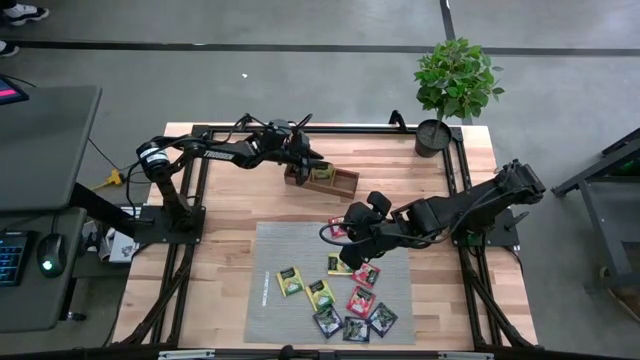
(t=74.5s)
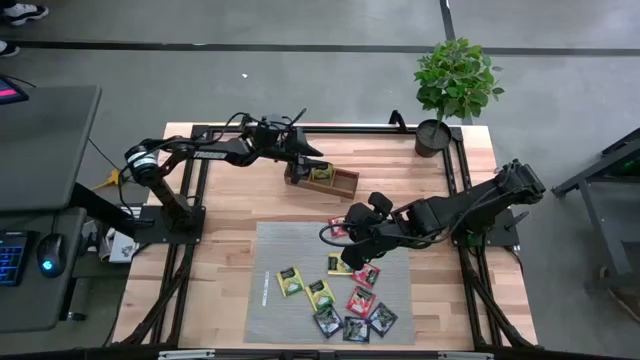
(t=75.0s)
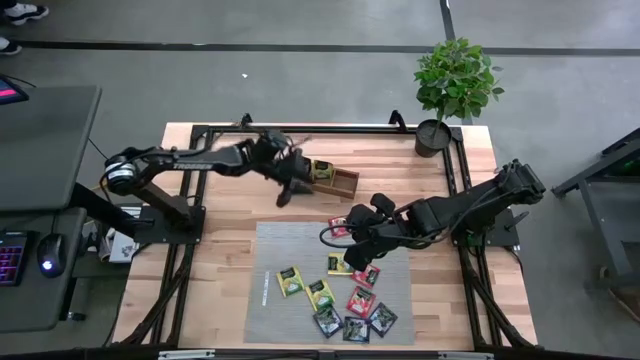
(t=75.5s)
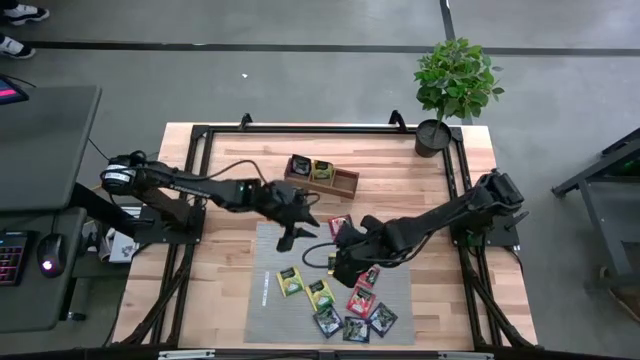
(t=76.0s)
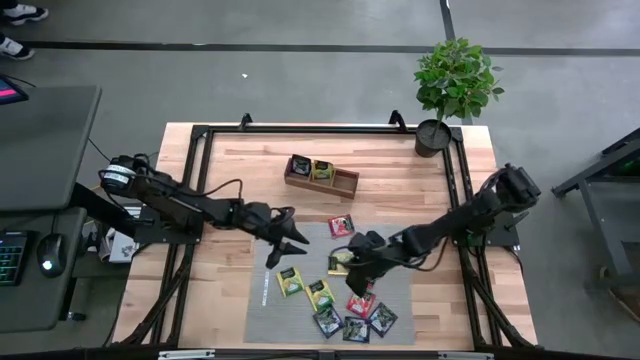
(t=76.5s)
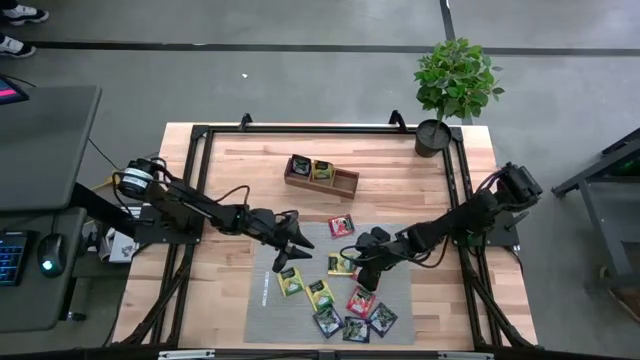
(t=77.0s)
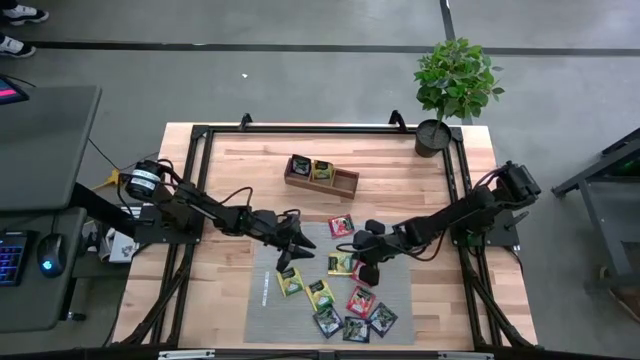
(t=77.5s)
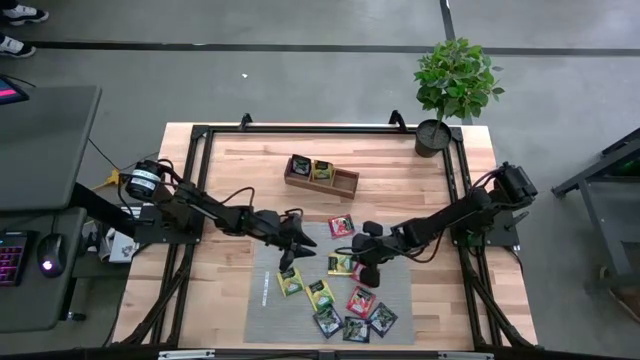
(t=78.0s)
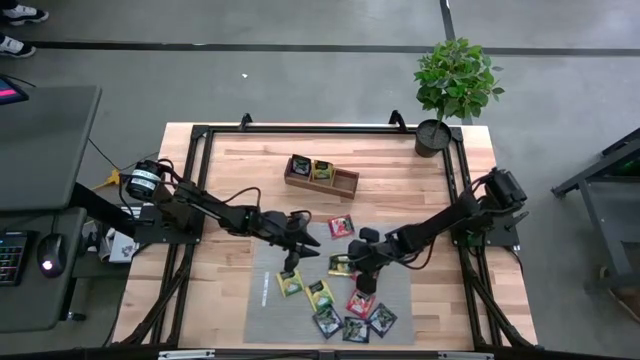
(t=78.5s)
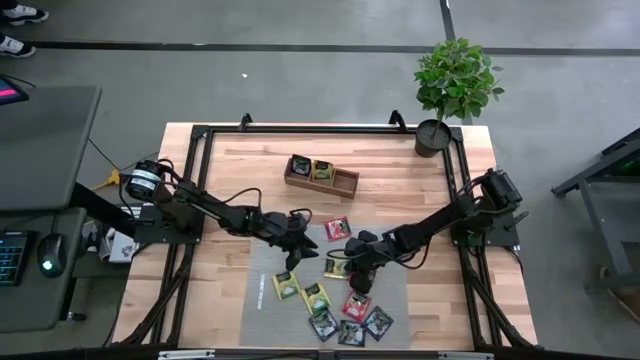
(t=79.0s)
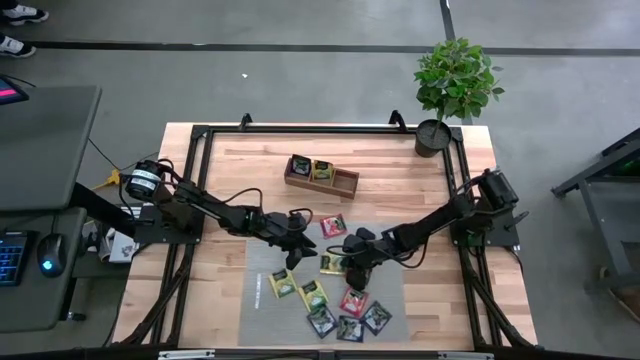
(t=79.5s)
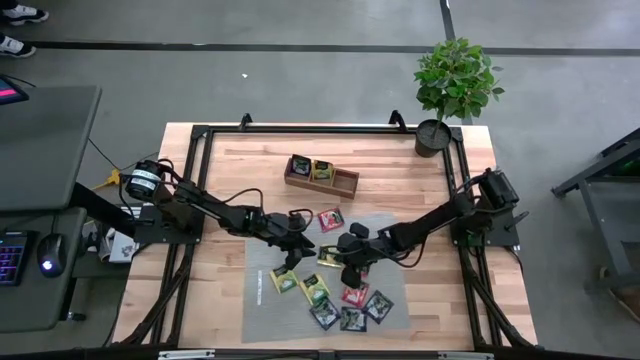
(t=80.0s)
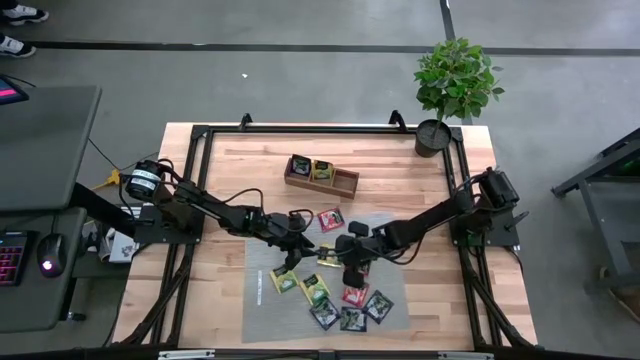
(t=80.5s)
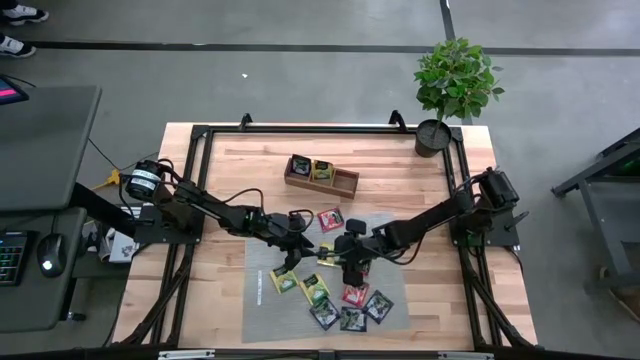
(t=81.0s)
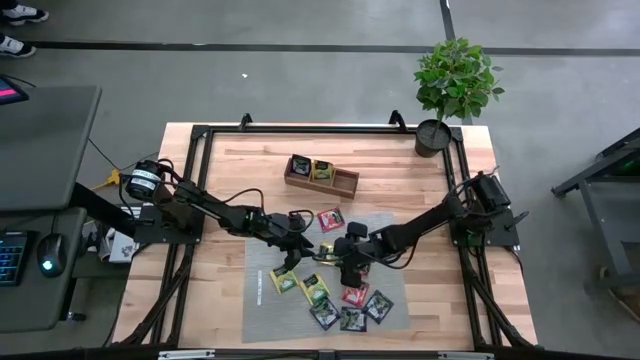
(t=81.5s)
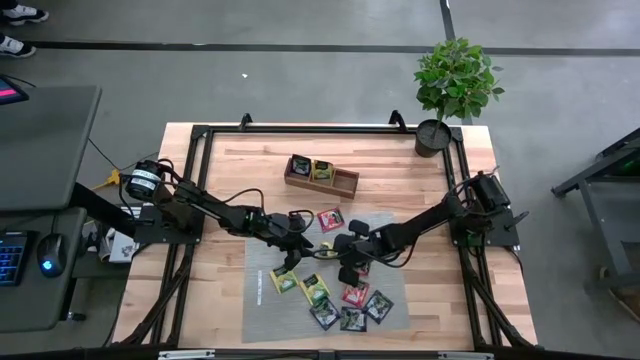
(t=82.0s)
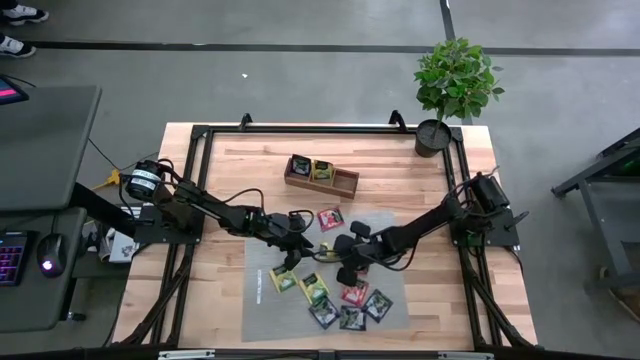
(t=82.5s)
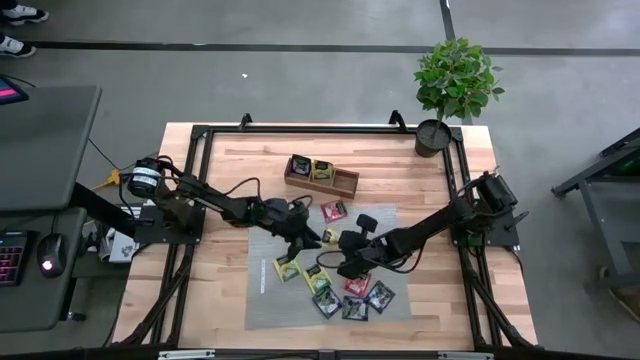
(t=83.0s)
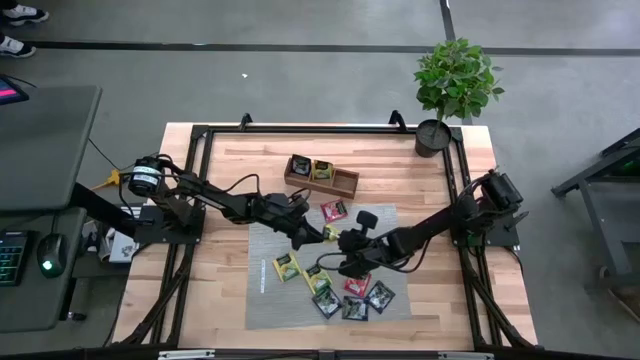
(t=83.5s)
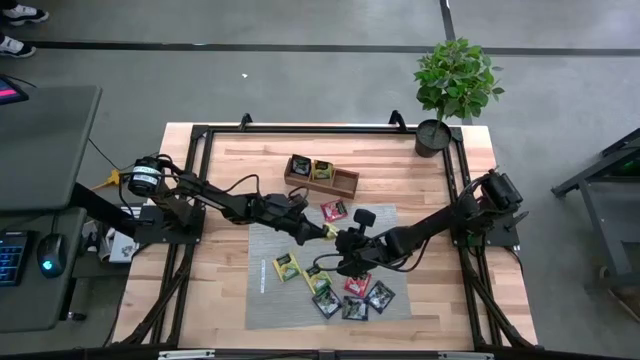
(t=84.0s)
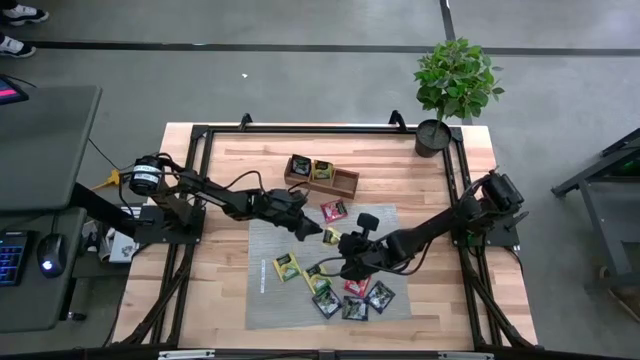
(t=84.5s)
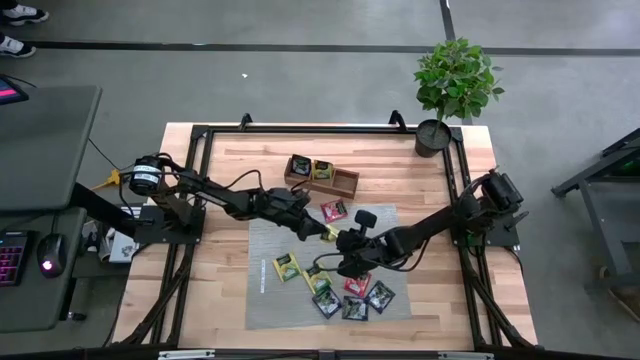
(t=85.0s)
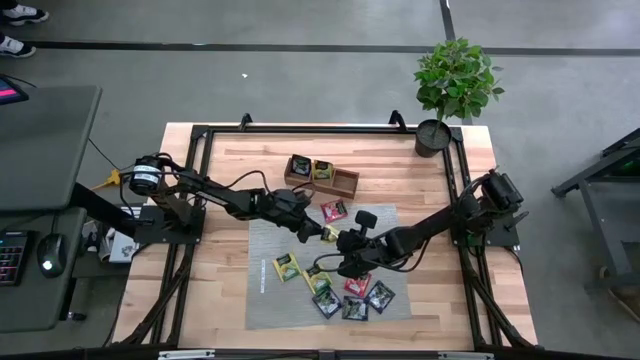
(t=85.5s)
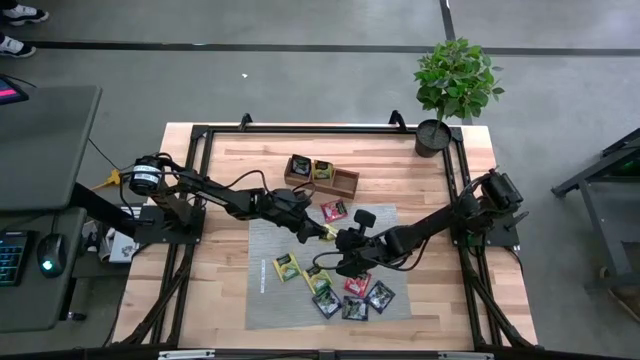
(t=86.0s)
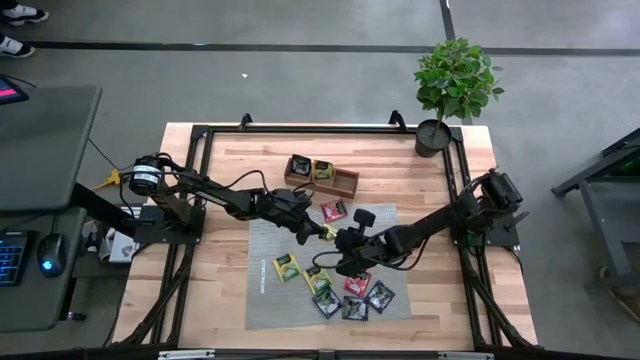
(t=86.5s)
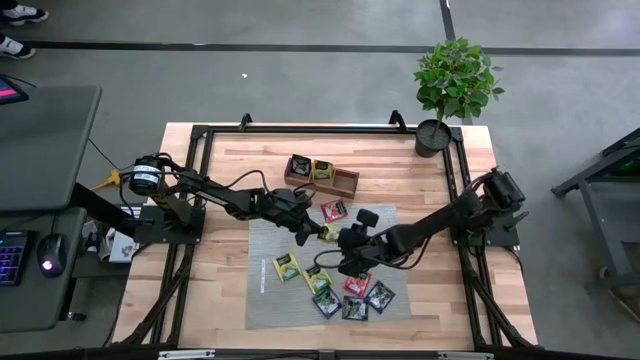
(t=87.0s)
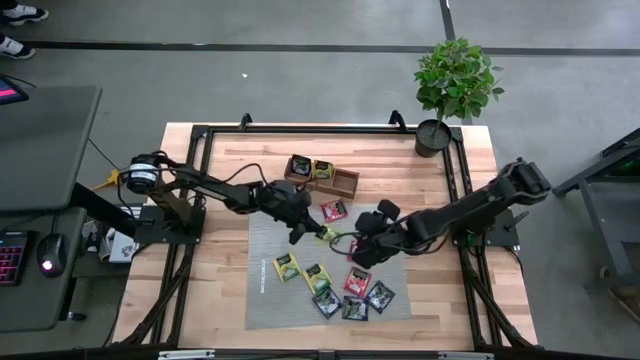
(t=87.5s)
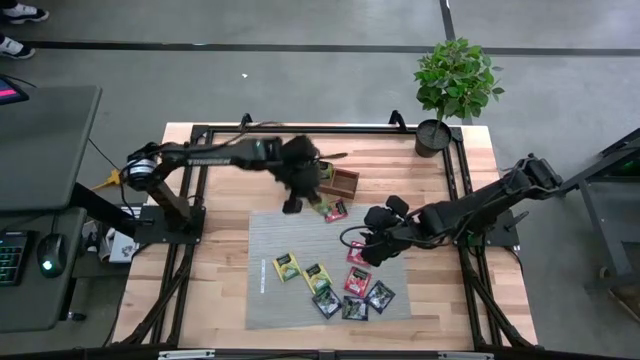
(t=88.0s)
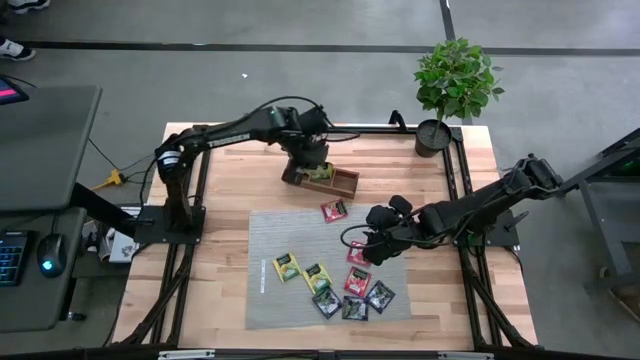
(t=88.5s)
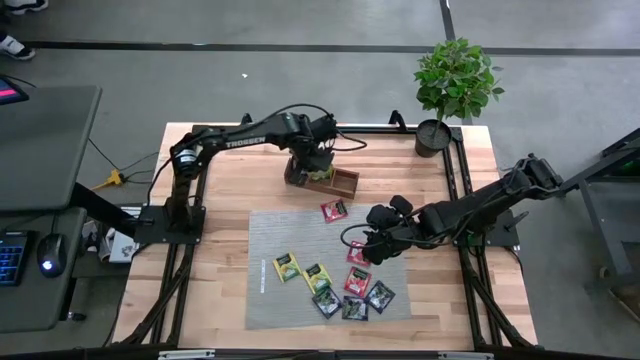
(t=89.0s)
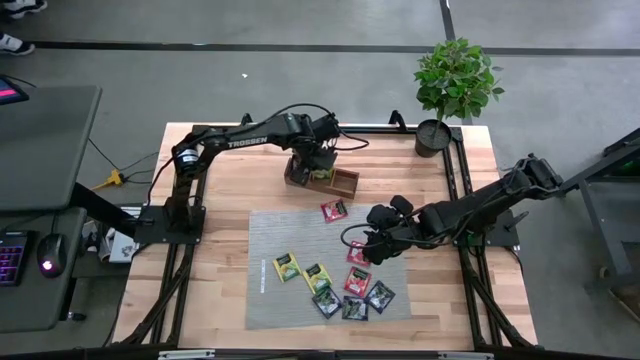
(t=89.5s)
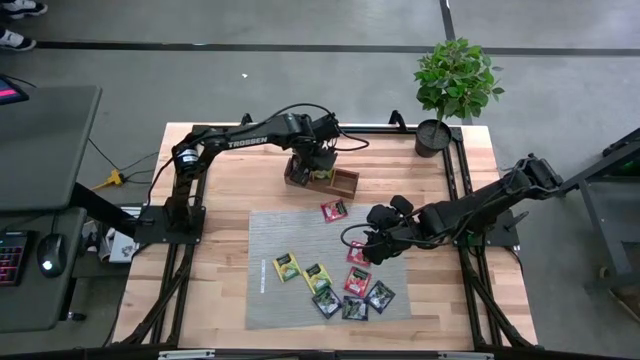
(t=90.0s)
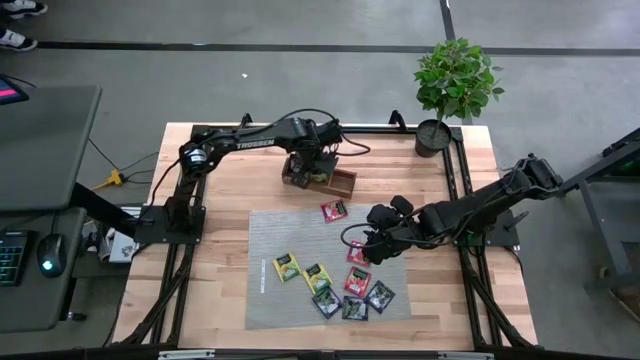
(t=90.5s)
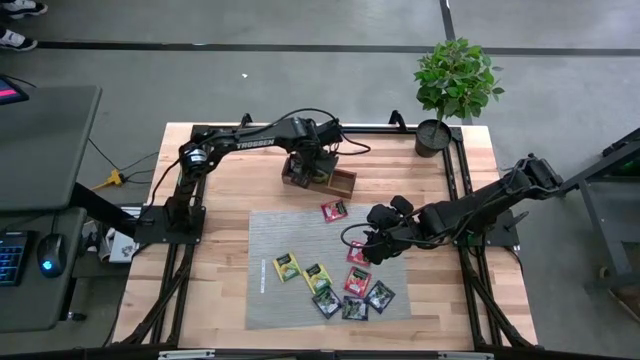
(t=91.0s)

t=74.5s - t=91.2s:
Task: Pick & Place Tea
Put the yellow tea bag into the middle section of the wooden organizer
